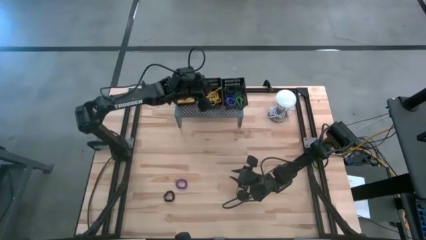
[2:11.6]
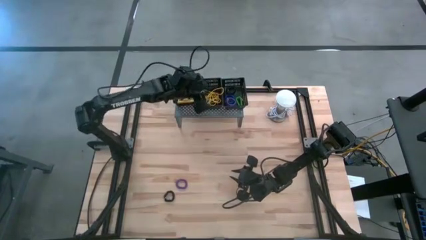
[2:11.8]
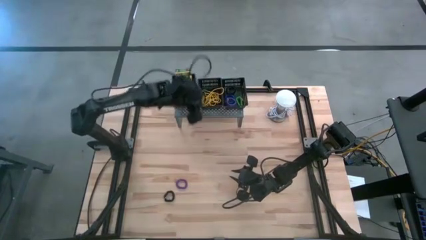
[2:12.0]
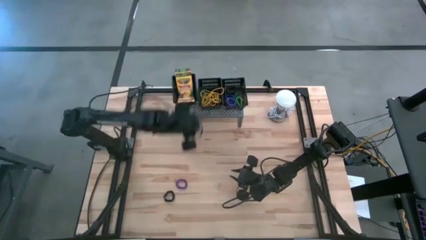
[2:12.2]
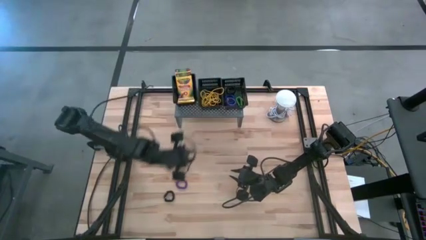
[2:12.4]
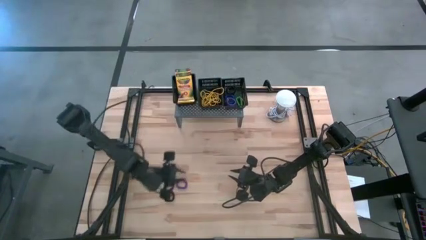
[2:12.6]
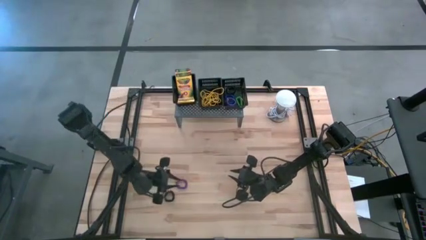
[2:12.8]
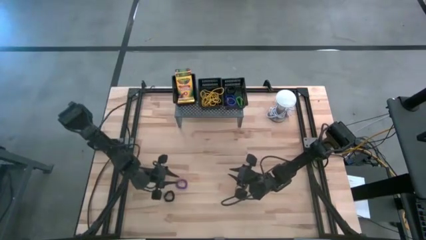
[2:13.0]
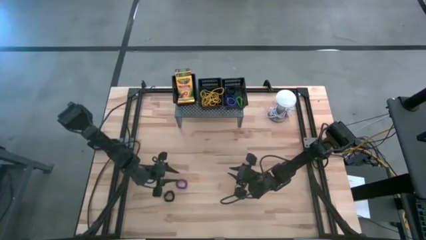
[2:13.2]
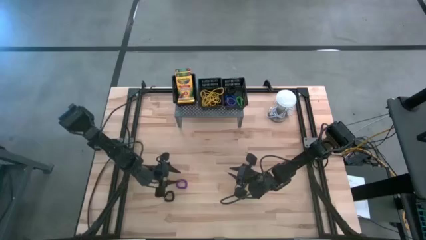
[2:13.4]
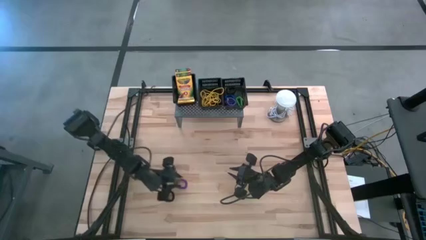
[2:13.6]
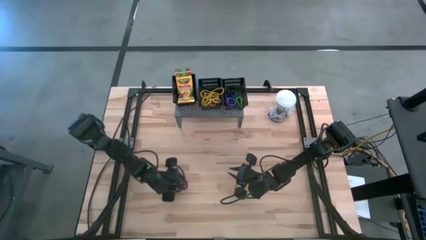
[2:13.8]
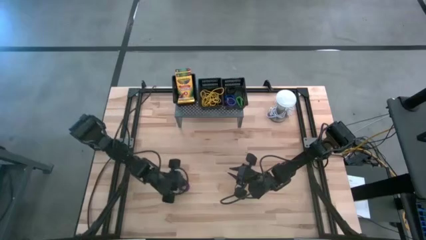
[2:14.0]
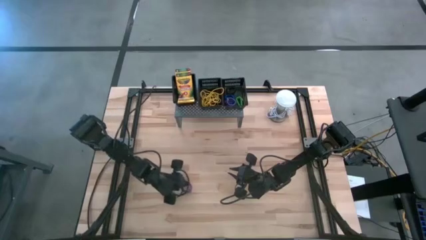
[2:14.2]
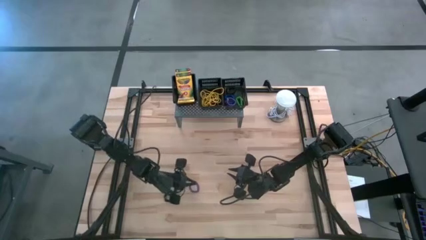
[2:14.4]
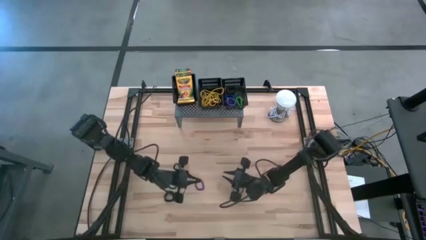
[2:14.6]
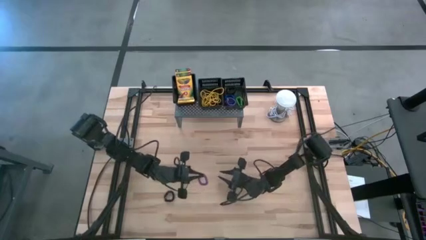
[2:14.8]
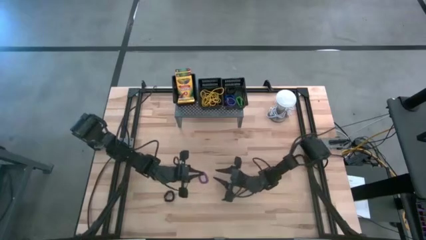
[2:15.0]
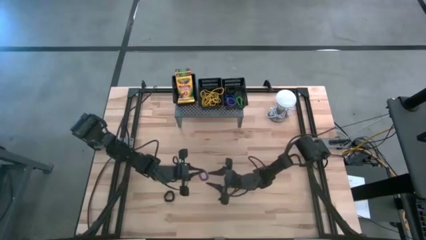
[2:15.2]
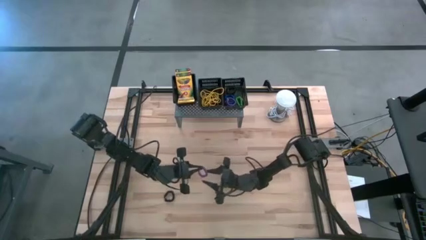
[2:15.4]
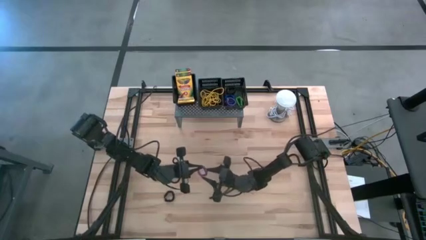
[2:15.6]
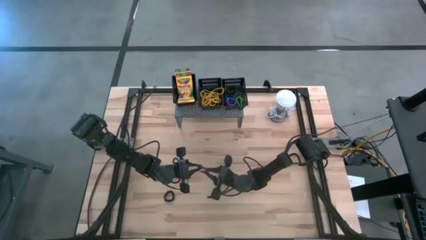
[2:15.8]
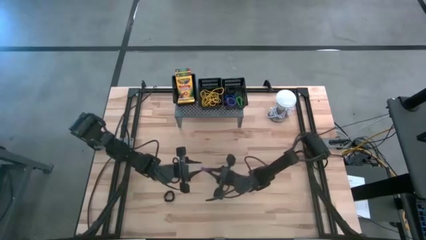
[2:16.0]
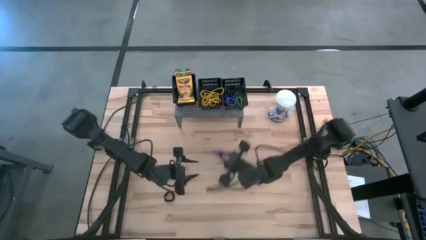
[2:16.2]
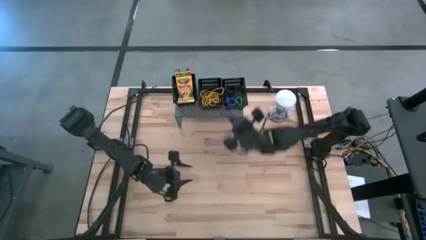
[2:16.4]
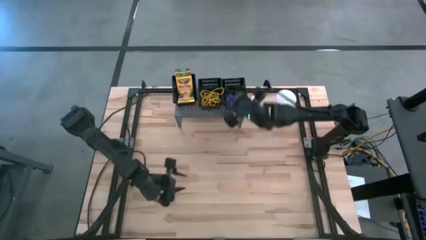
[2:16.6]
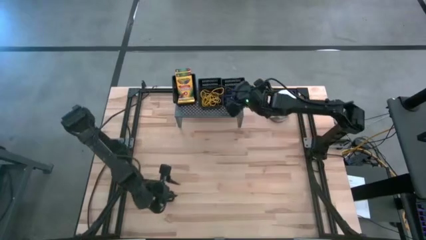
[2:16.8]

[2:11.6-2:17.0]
Task: Pick & Place Office Desk Supplies
Put the violet spring keychain in the right black bin on the shelf

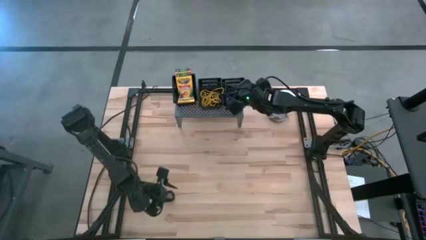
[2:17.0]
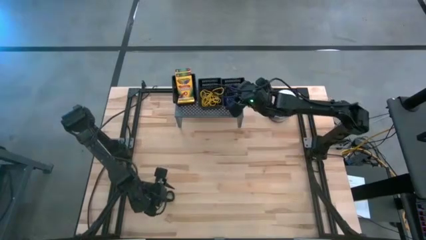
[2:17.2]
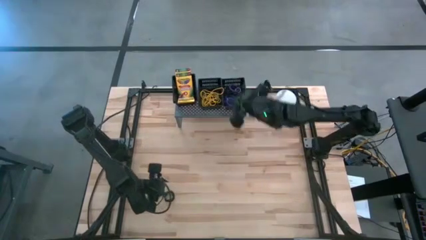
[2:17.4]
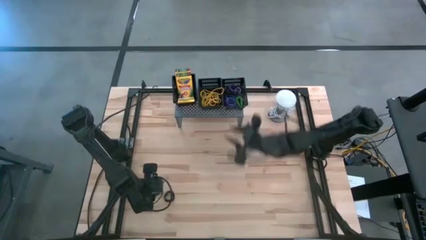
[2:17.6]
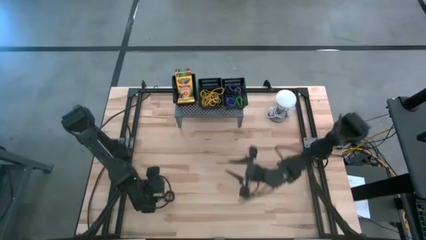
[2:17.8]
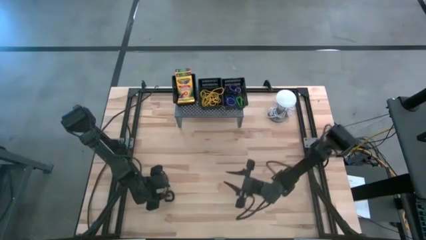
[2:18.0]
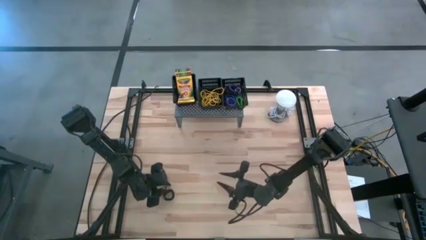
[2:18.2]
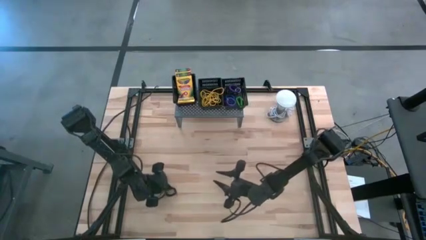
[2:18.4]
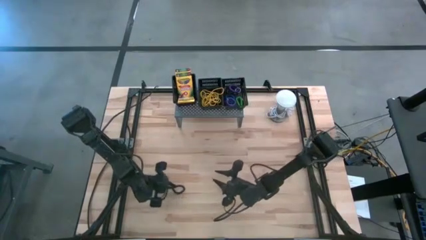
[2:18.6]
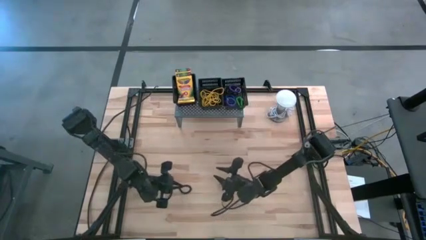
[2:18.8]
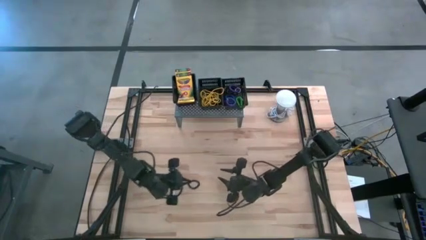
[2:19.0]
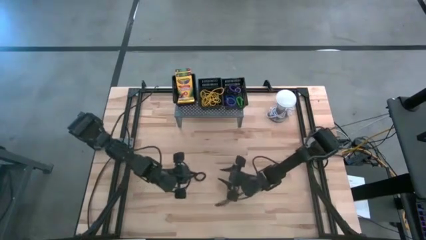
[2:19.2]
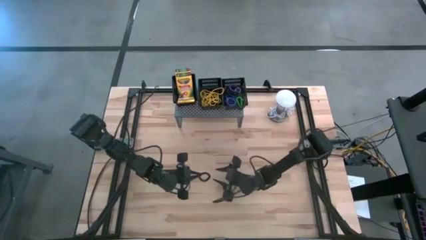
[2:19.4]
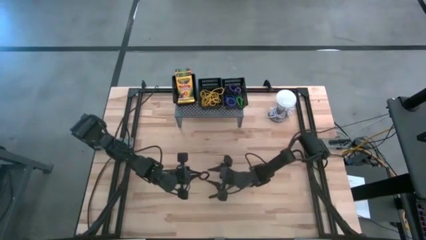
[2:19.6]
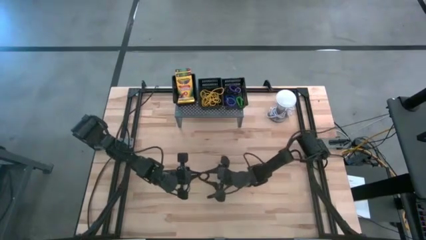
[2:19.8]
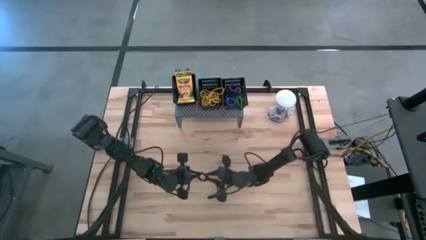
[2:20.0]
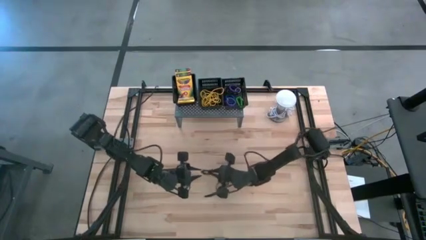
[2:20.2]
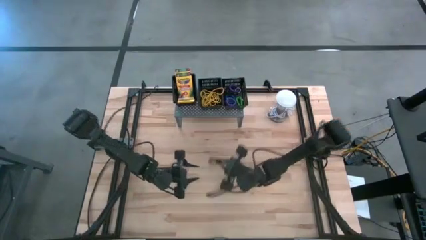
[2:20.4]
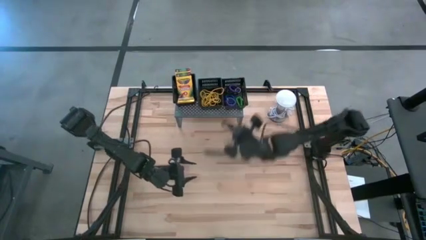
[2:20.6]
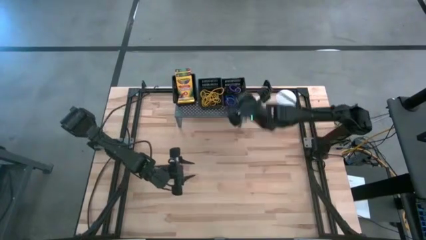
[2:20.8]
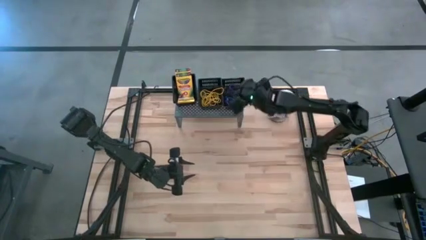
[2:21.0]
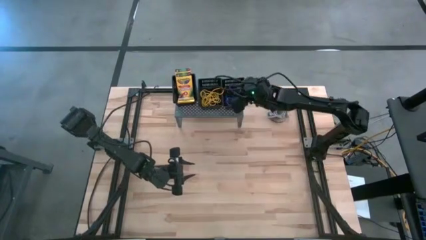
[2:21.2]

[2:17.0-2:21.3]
Put the black spring keychain in the right black bin on the shelf

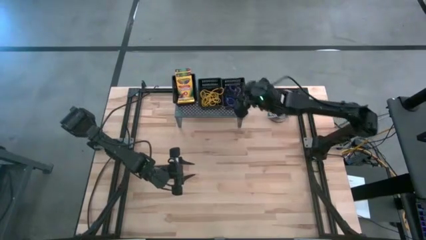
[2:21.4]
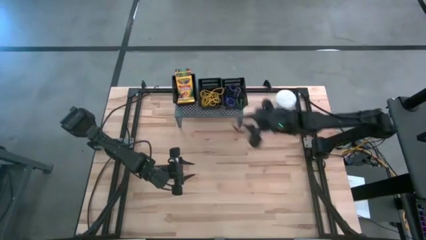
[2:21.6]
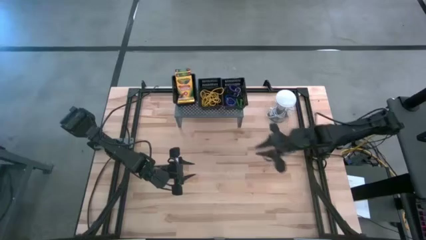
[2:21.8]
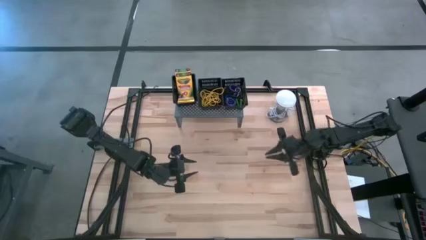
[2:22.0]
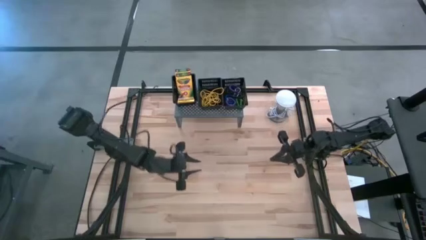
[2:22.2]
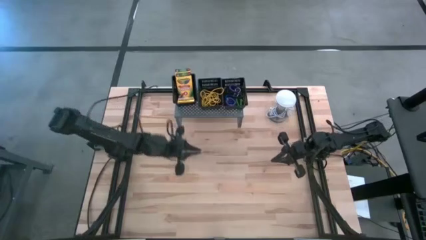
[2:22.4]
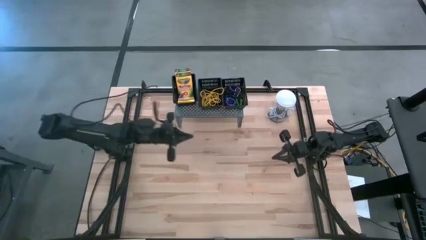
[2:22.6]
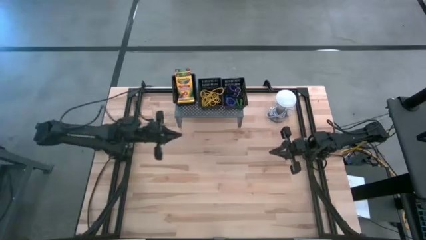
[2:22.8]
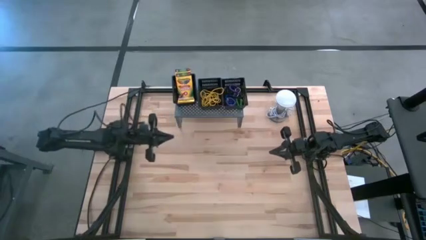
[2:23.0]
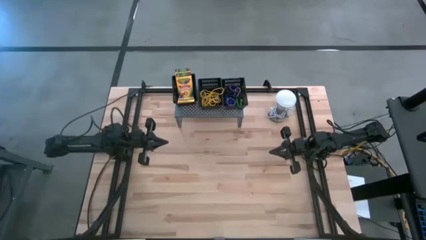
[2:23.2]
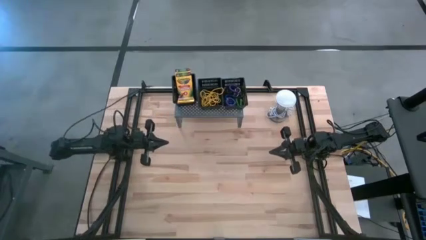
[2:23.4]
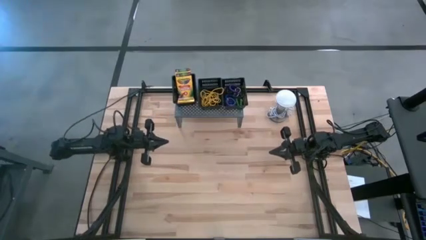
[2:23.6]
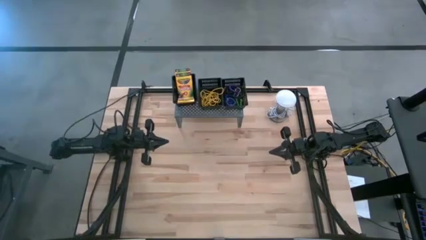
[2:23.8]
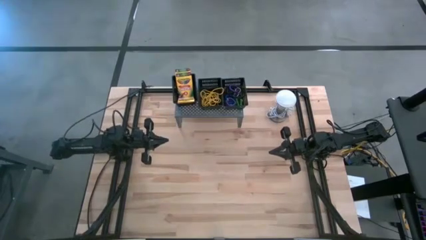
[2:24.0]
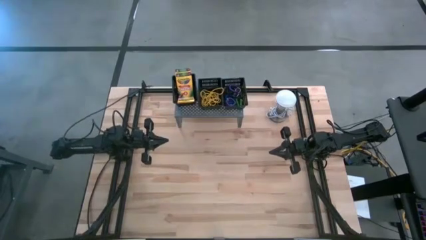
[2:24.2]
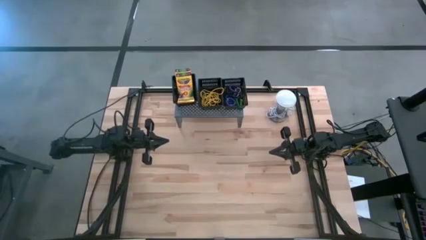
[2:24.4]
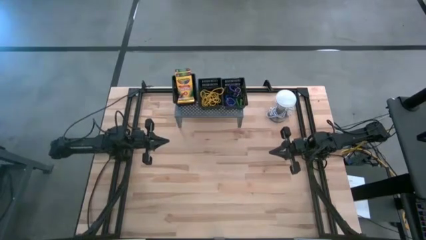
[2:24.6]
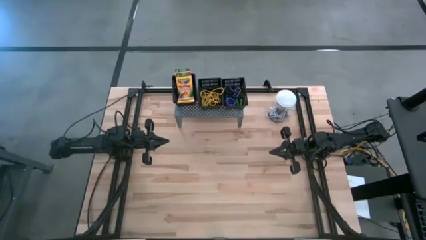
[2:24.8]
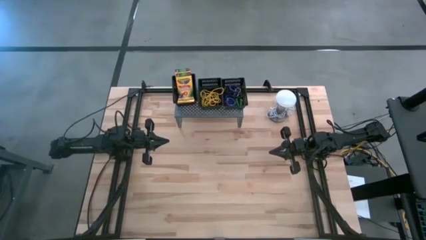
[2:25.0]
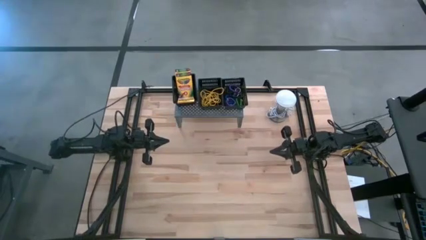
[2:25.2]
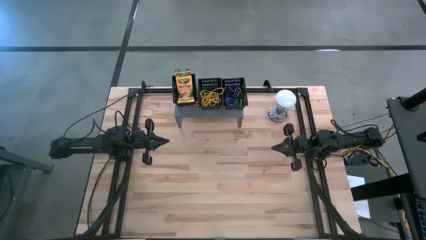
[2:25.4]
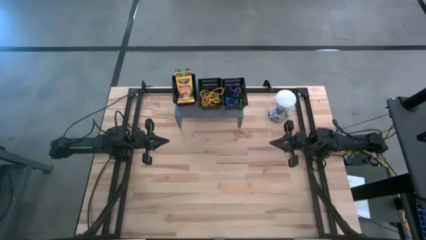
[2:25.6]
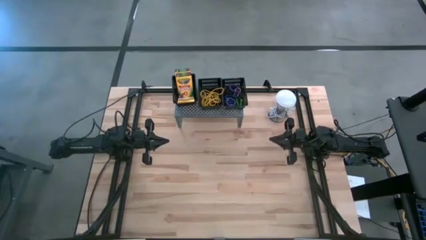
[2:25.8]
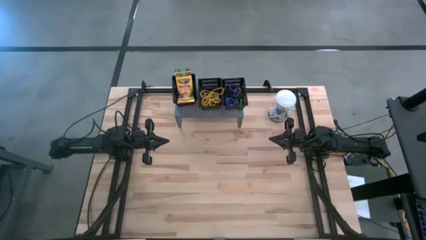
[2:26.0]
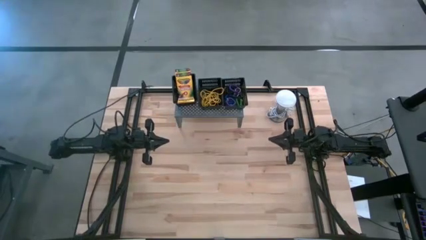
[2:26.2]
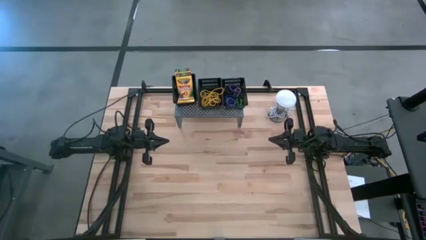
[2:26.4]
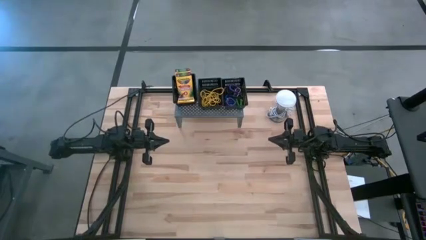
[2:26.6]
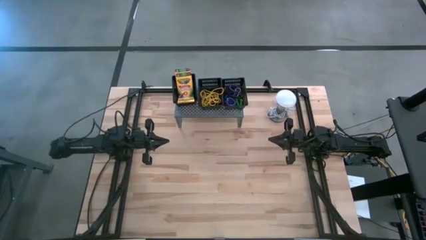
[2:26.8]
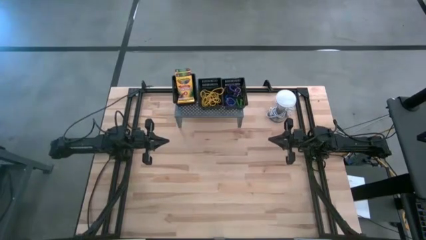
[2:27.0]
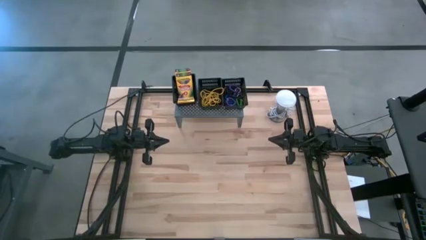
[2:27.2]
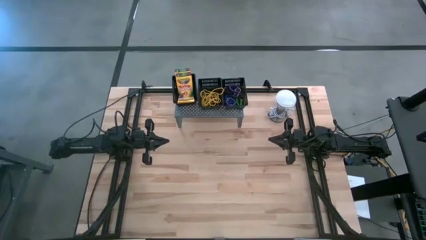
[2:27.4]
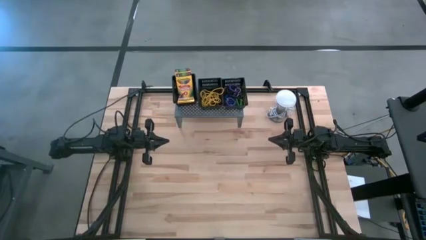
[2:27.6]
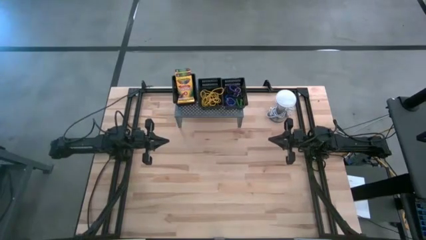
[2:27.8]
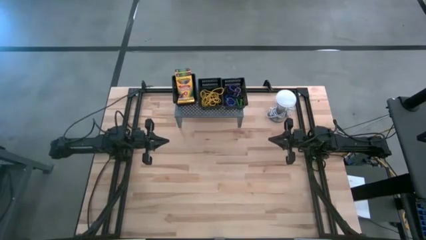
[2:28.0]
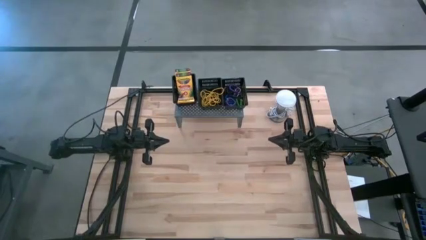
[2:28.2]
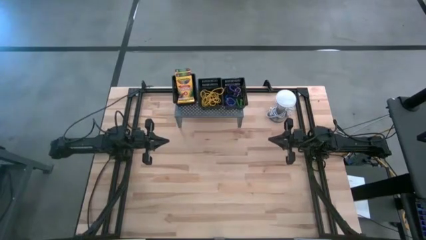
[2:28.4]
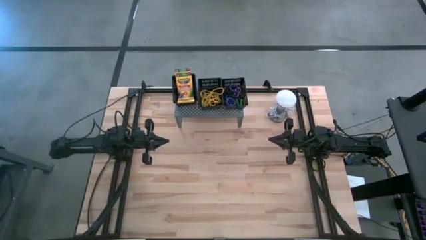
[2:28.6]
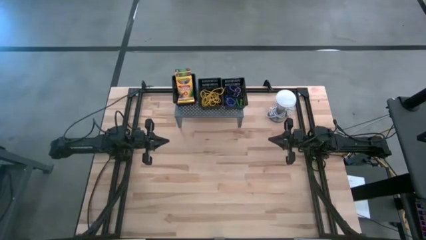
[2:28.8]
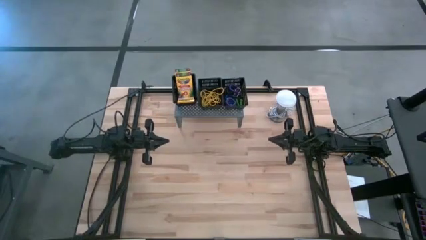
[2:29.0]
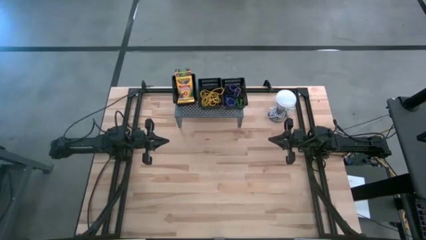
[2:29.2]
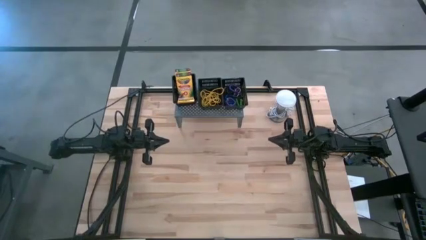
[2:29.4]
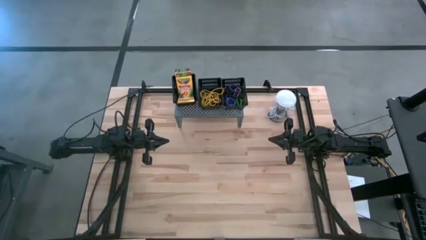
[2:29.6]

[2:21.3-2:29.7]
Return to Home Position
